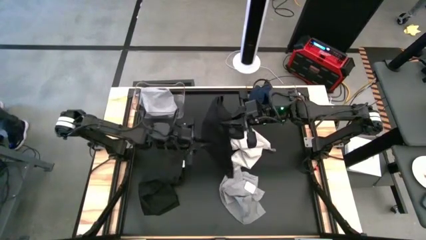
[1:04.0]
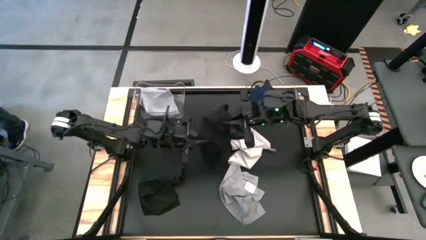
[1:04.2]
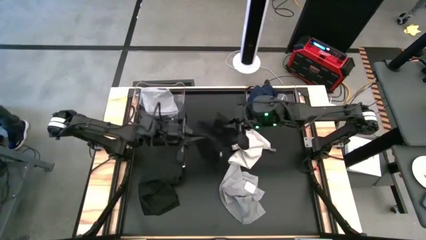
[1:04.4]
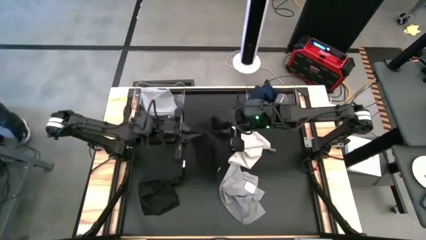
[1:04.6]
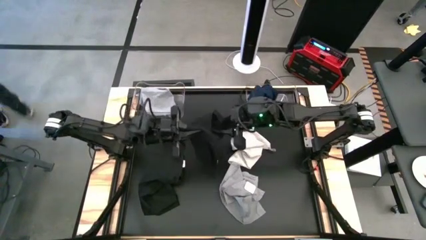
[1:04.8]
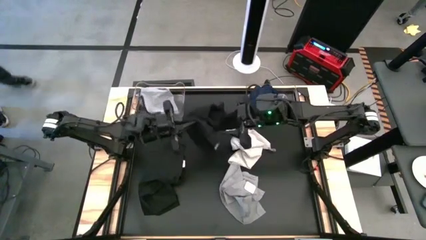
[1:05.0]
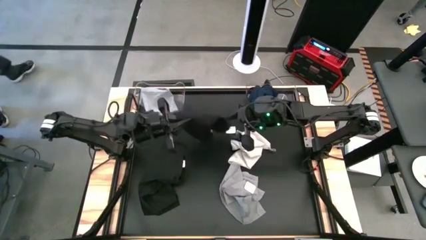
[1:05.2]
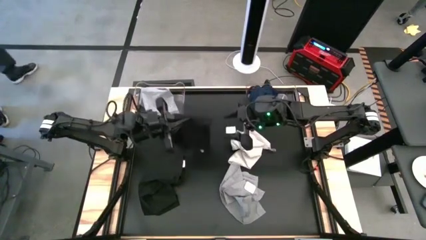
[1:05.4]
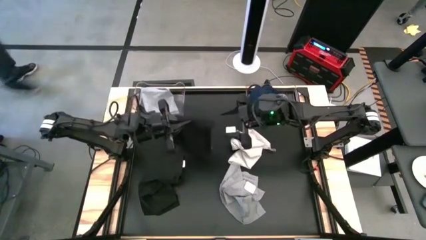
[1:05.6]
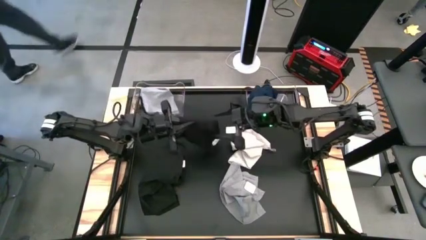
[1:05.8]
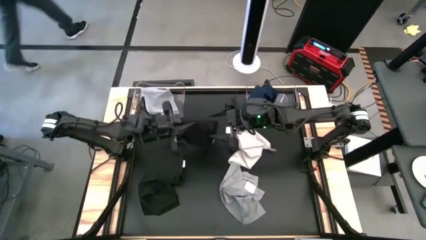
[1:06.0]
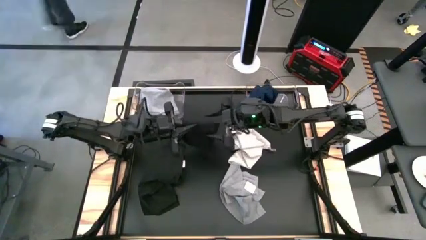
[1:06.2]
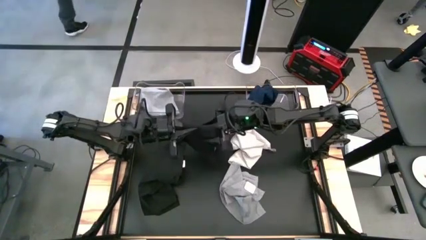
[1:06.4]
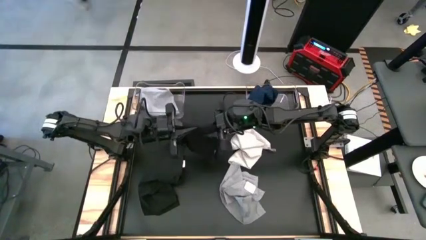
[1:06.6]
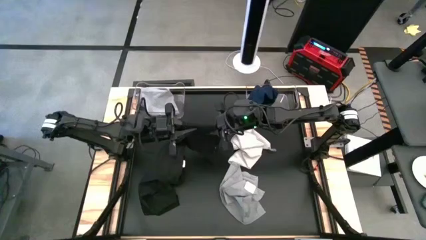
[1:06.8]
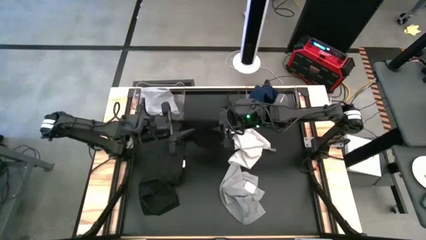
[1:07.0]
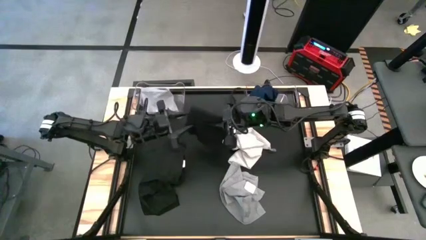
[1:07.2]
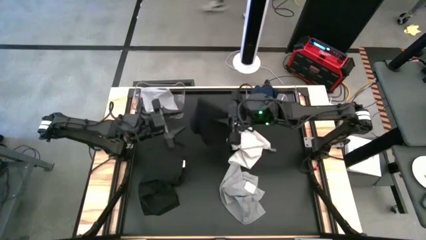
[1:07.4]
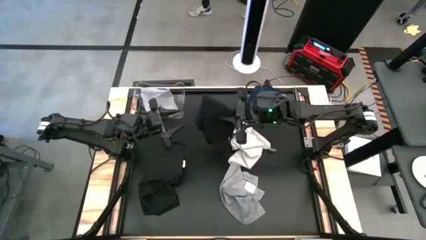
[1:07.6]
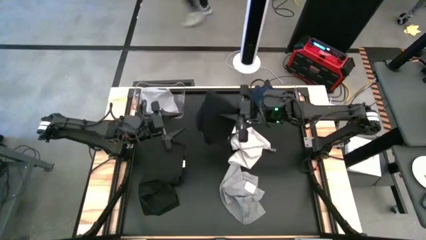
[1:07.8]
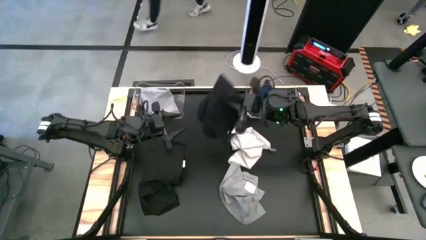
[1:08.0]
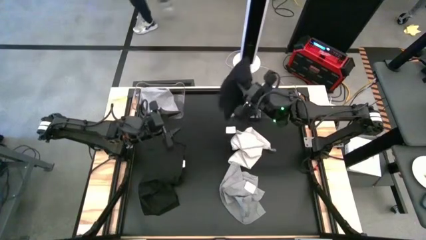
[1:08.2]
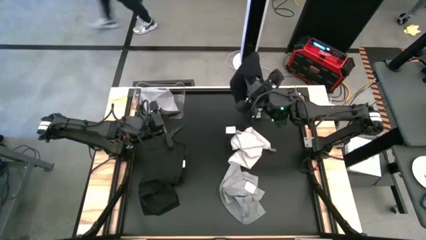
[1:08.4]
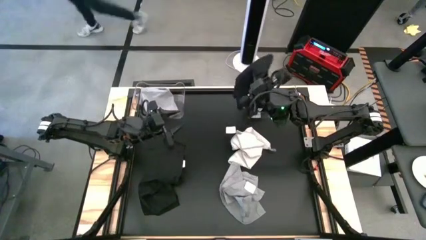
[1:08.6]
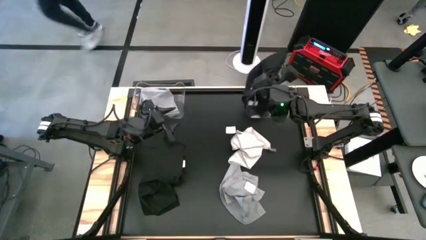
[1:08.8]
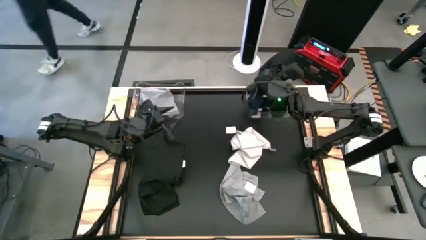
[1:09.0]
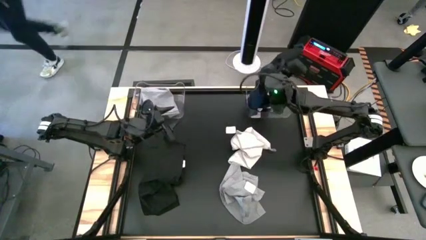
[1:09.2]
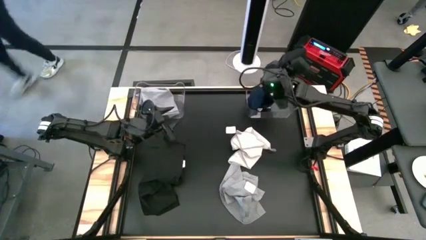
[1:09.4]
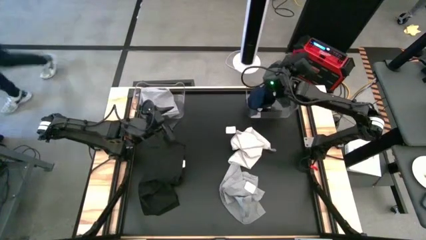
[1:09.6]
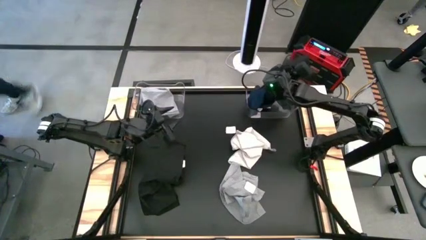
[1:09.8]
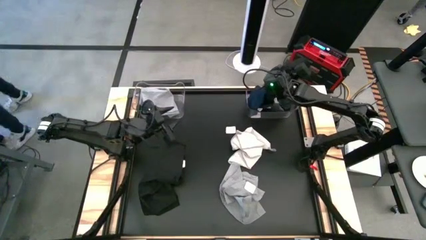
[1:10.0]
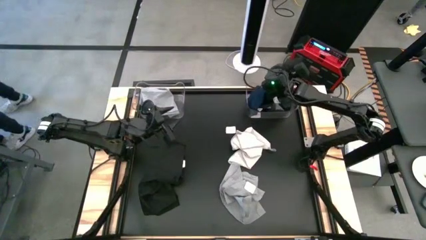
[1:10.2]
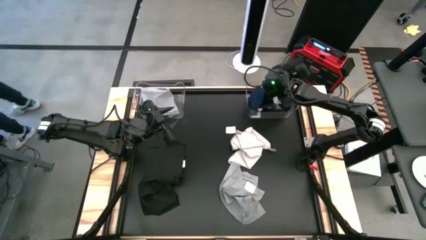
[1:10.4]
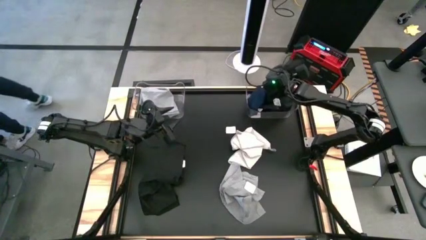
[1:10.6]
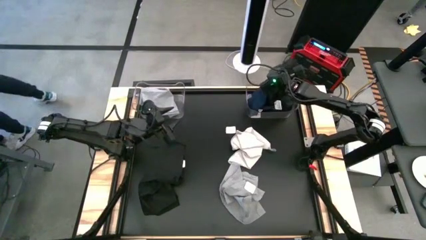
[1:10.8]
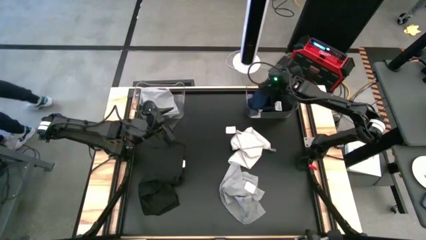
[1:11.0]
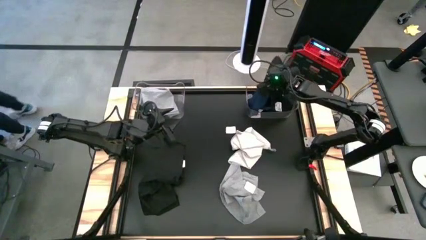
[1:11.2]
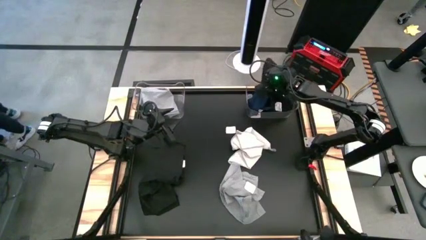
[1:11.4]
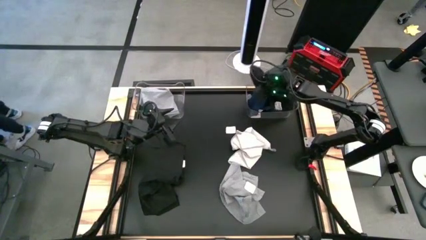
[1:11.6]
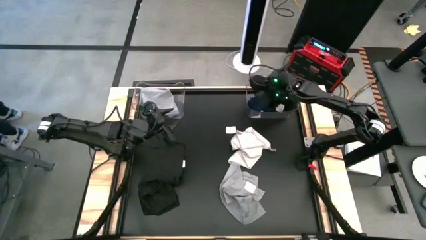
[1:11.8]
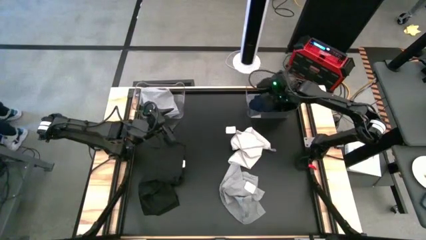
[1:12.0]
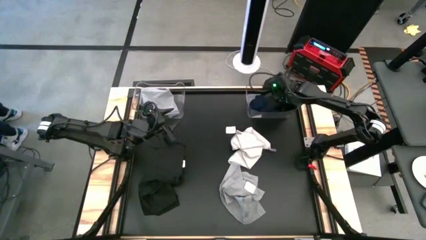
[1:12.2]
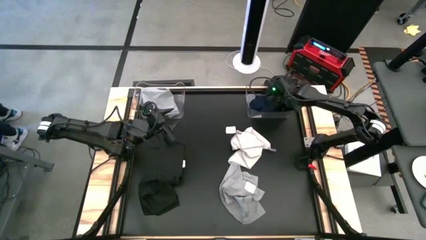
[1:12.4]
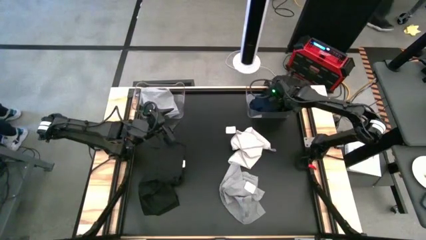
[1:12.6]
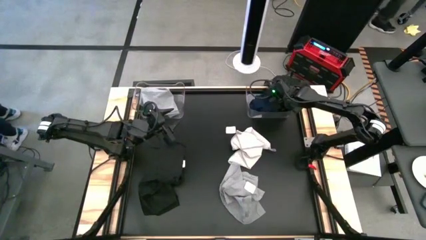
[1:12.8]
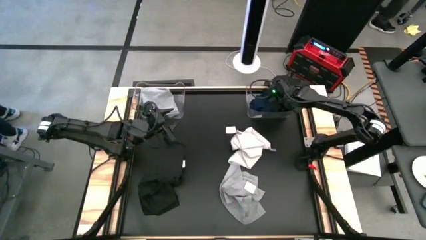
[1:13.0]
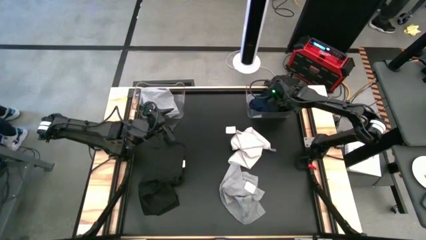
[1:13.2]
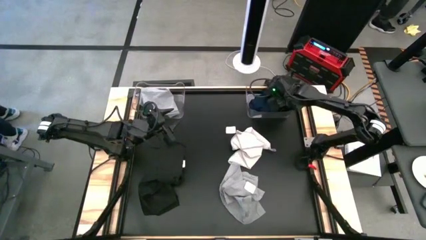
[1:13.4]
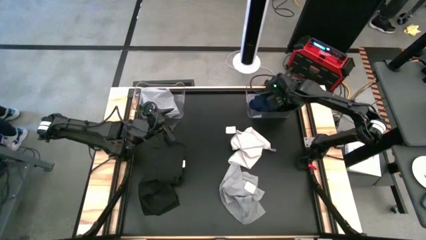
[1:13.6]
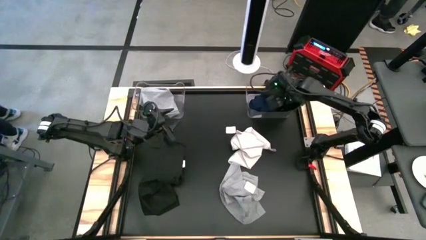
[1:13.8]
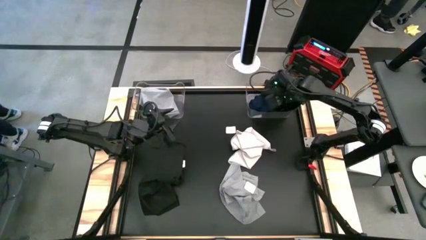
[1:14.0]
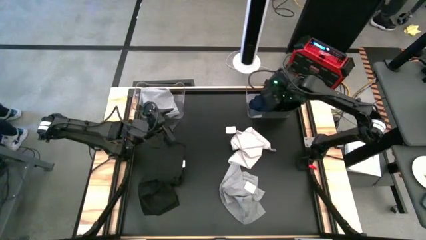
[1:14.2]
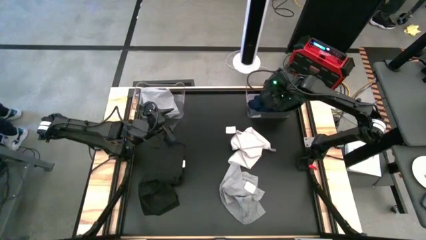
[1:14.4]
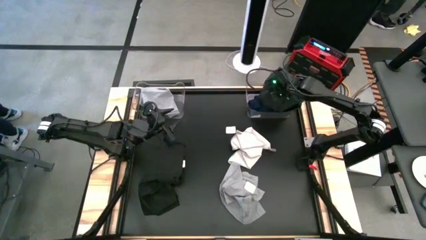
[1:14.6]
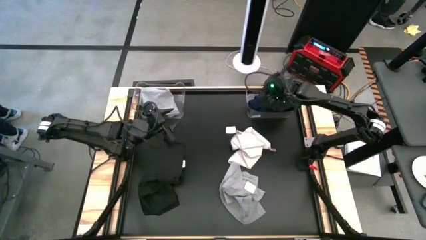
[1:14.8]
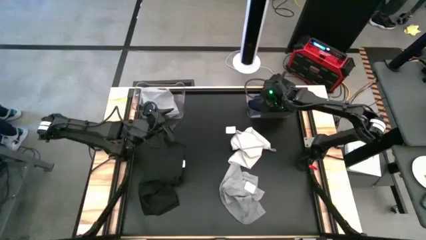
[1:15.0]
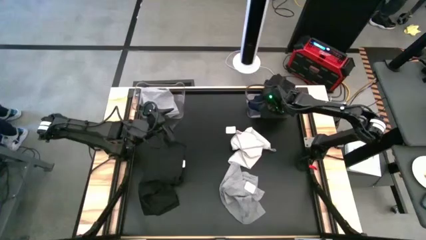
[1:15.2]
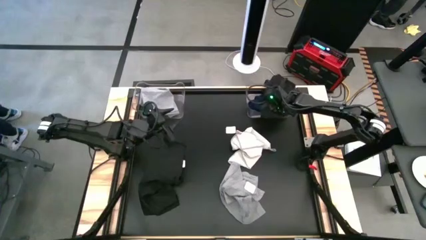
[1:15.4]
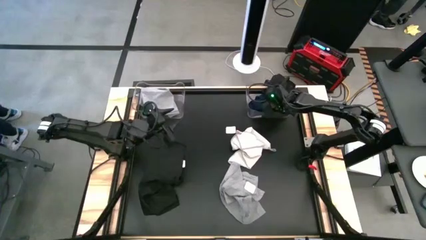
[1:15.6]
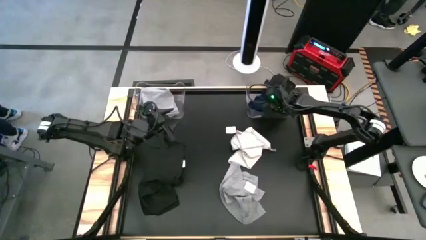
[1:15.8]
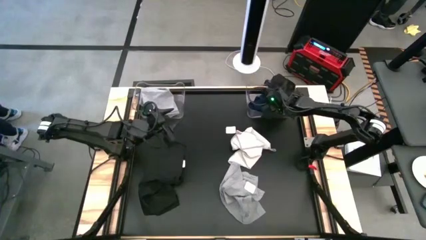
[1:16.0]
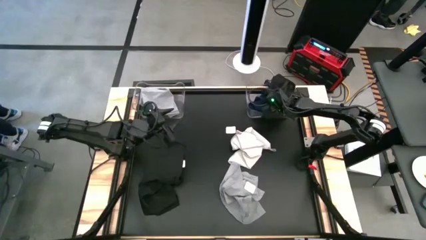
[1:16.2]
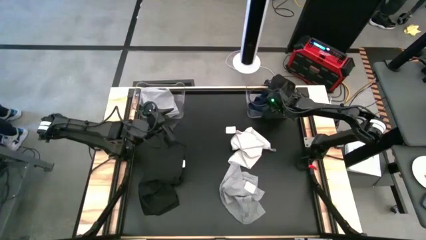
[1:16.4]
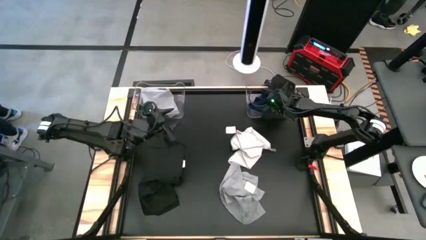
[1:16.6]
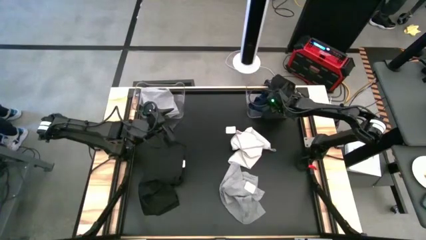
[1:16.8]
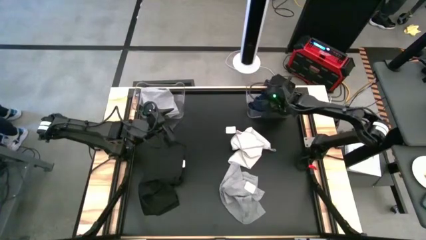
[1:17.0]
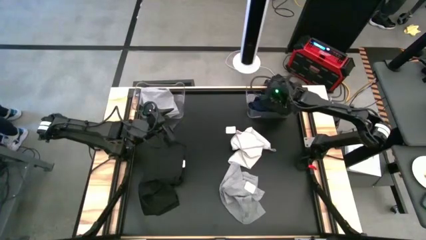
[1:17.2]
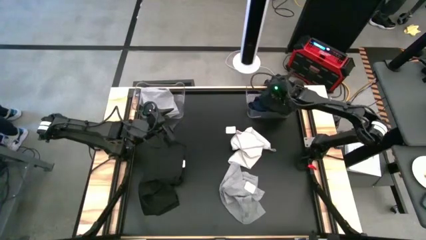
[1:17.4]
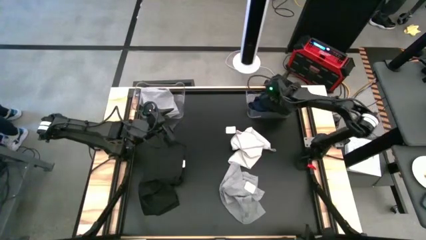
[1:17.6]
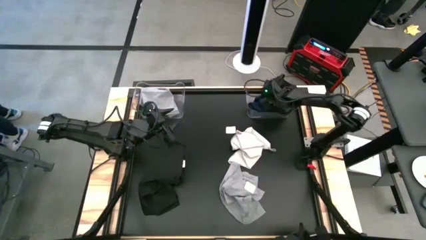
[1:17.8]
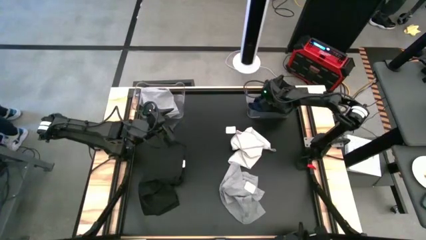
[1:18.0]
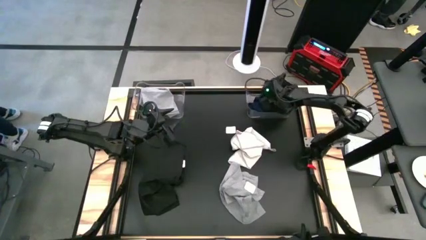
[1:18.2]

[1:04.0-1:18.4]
Task: Sort towels by color in basket
Put the right black towel into the right transparent bin
